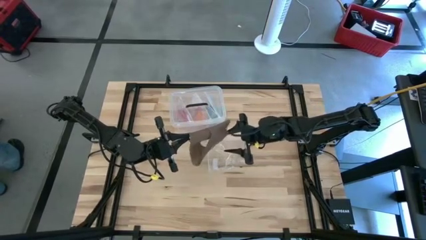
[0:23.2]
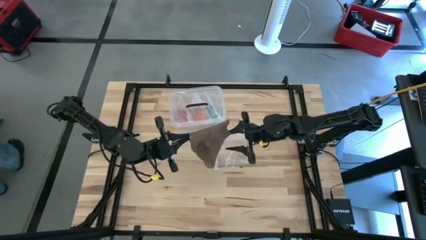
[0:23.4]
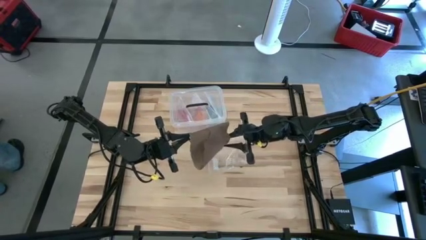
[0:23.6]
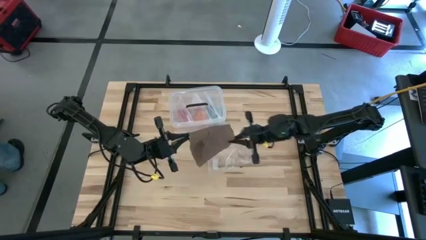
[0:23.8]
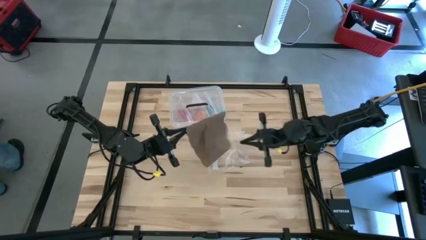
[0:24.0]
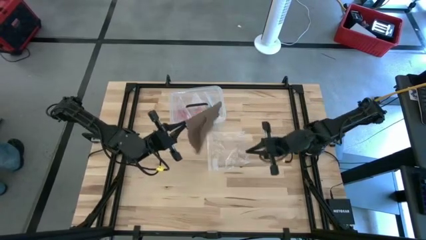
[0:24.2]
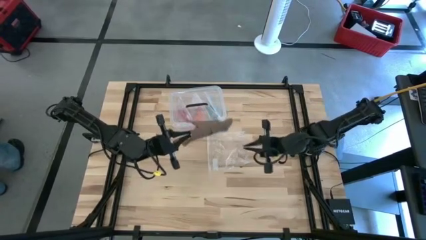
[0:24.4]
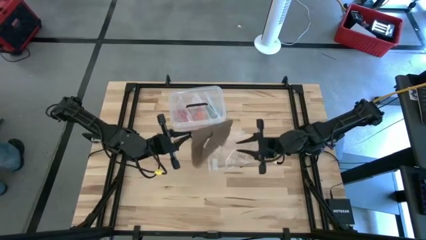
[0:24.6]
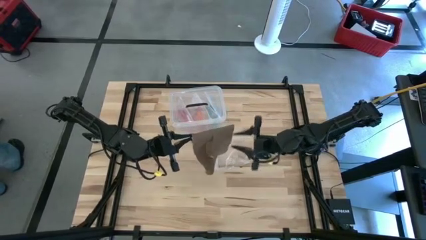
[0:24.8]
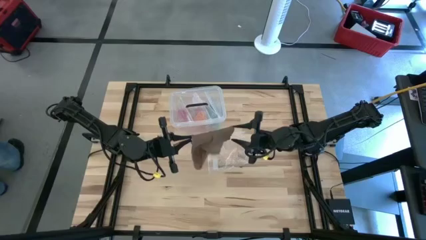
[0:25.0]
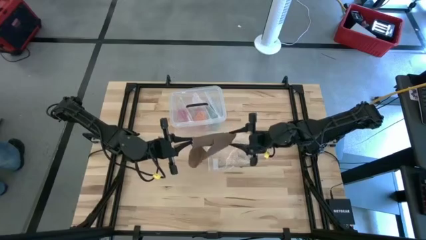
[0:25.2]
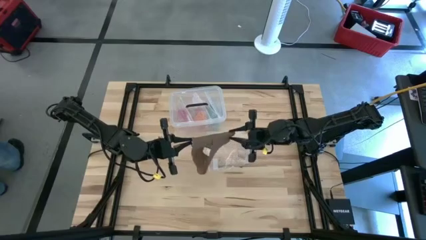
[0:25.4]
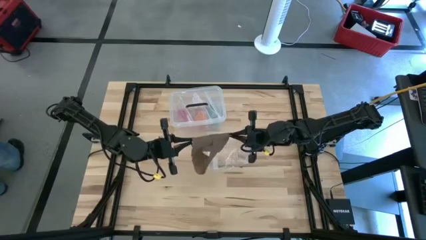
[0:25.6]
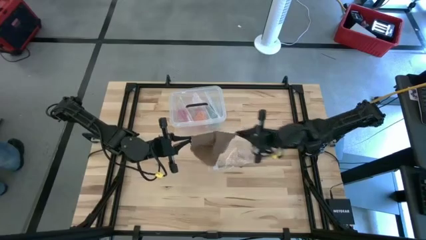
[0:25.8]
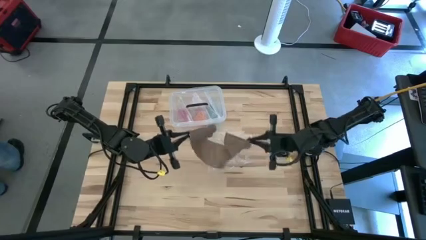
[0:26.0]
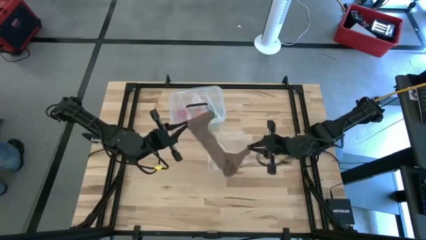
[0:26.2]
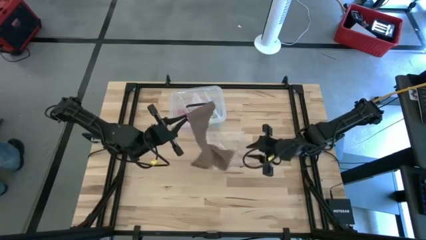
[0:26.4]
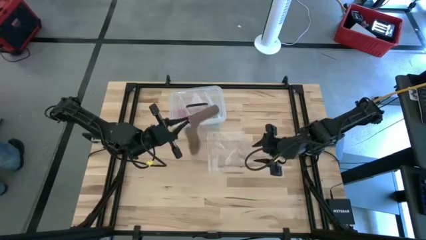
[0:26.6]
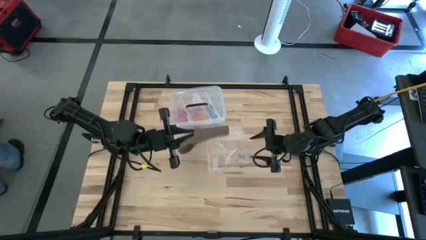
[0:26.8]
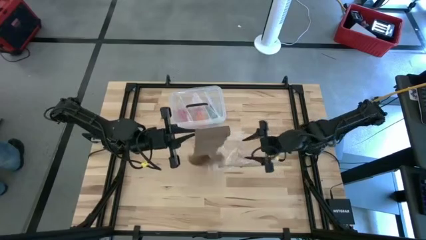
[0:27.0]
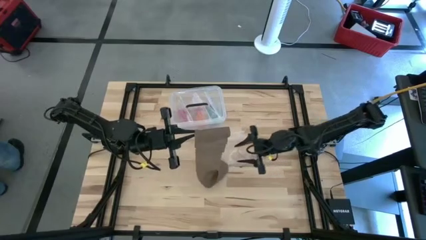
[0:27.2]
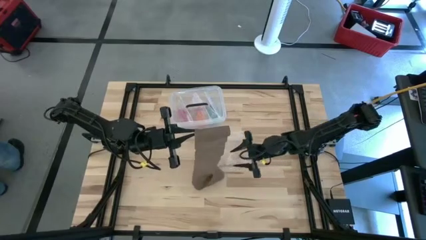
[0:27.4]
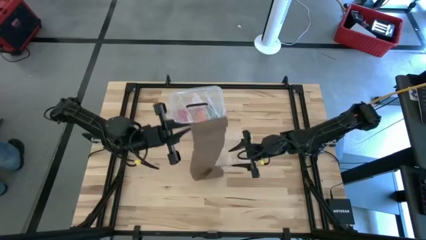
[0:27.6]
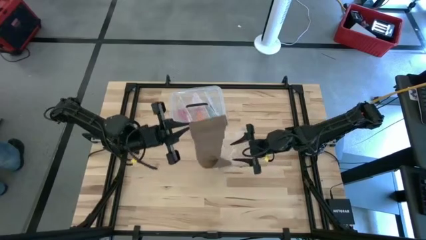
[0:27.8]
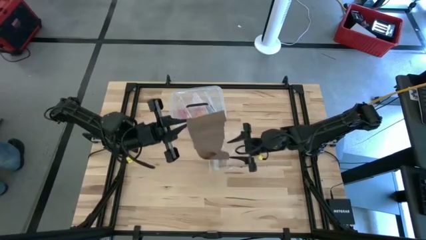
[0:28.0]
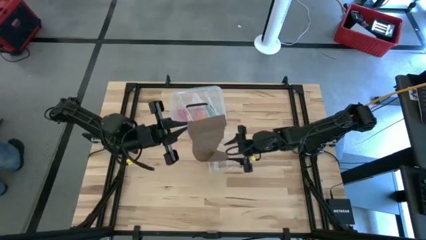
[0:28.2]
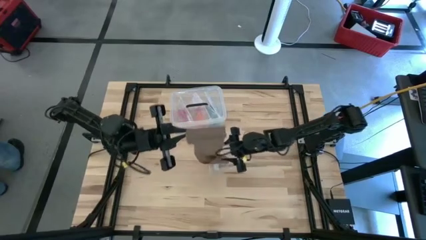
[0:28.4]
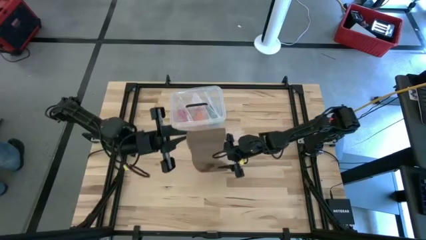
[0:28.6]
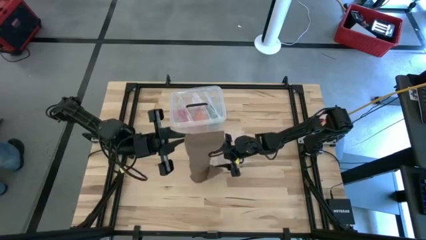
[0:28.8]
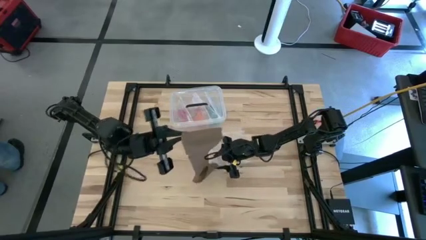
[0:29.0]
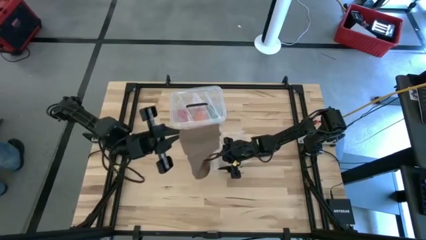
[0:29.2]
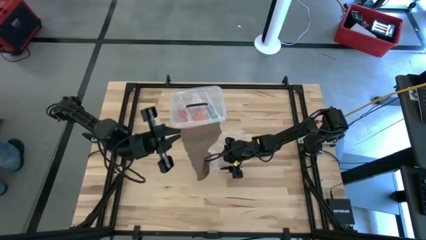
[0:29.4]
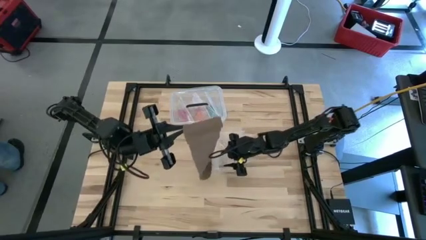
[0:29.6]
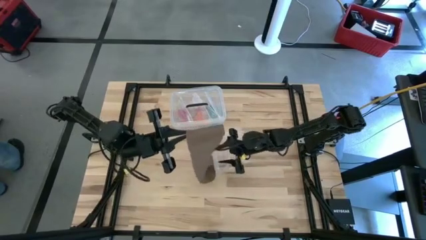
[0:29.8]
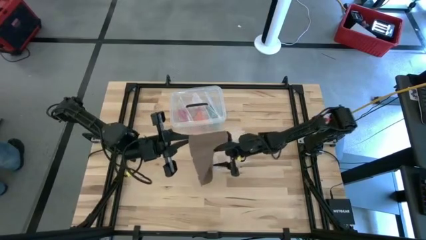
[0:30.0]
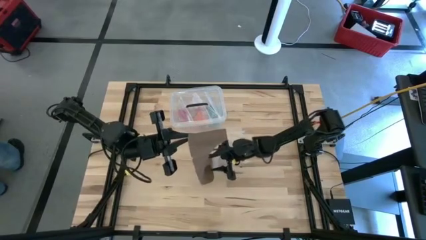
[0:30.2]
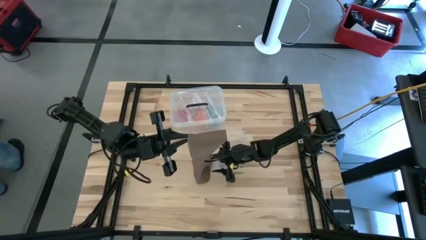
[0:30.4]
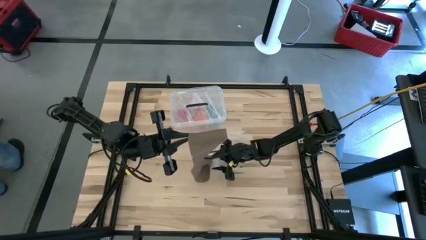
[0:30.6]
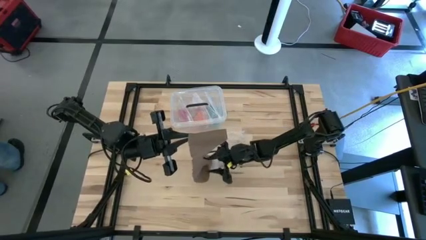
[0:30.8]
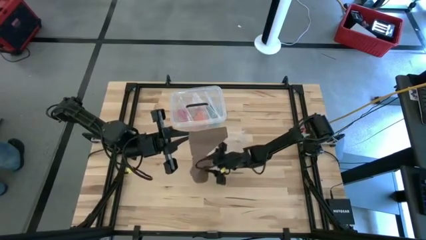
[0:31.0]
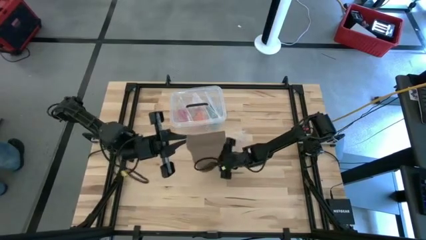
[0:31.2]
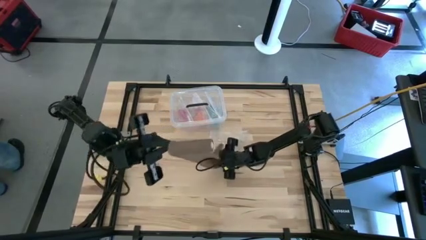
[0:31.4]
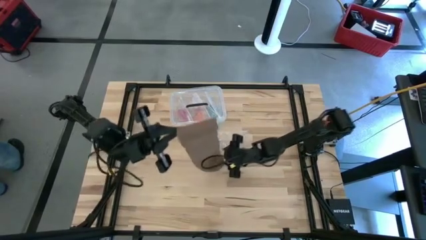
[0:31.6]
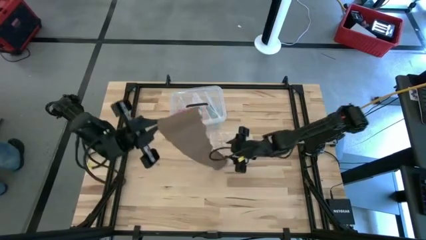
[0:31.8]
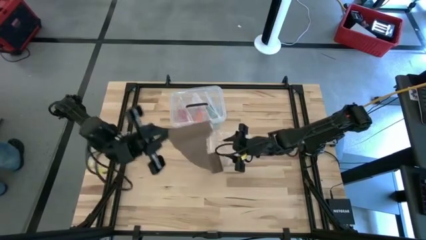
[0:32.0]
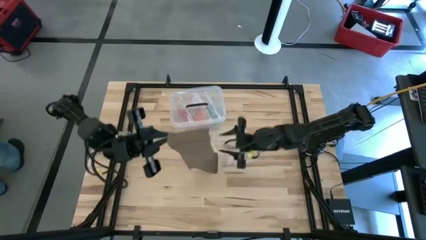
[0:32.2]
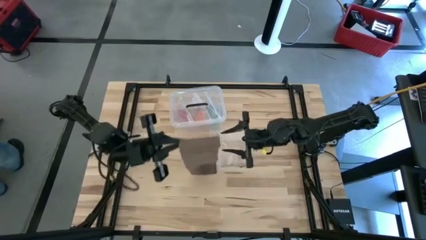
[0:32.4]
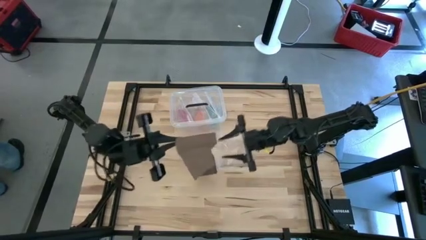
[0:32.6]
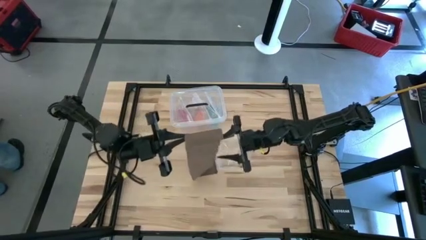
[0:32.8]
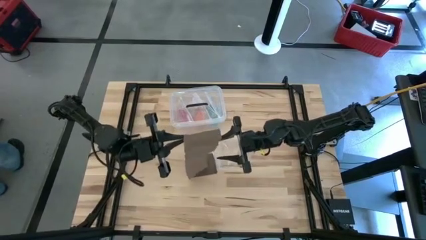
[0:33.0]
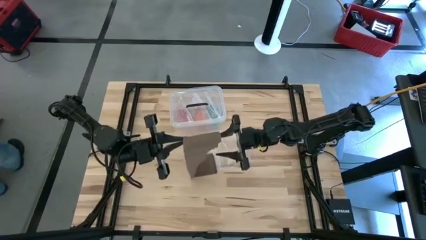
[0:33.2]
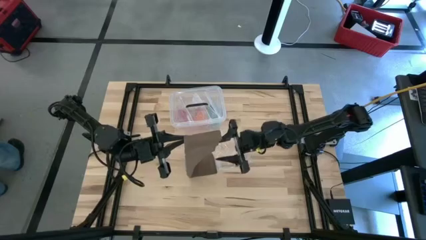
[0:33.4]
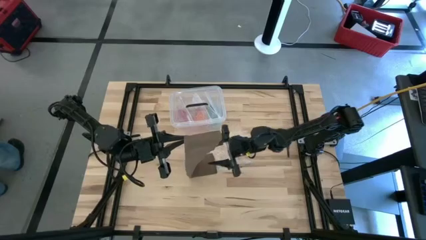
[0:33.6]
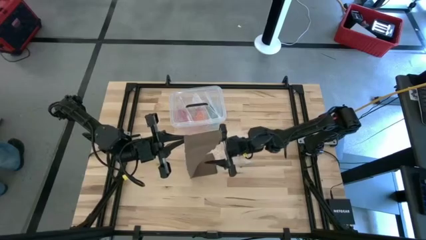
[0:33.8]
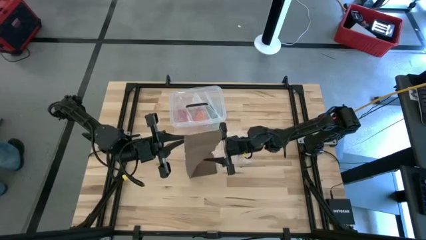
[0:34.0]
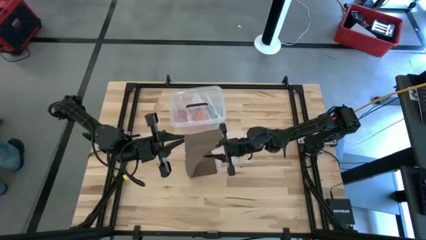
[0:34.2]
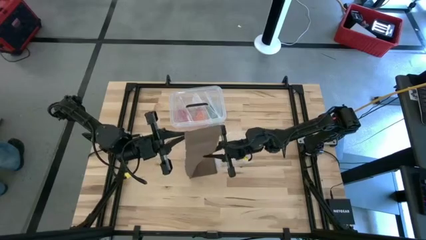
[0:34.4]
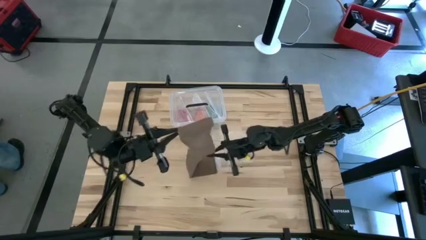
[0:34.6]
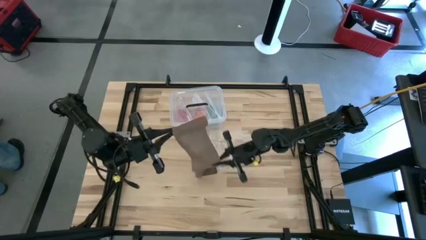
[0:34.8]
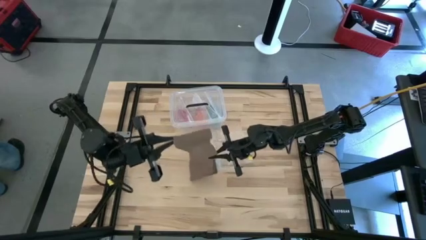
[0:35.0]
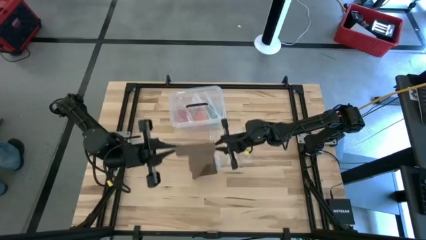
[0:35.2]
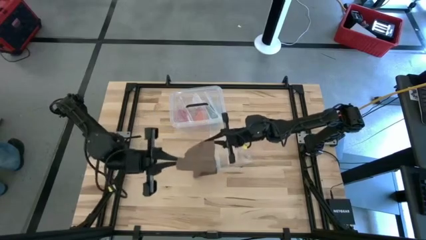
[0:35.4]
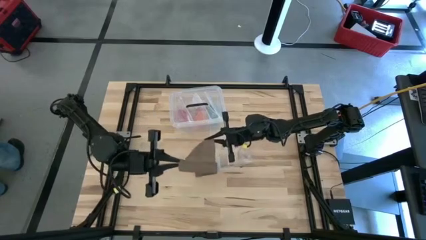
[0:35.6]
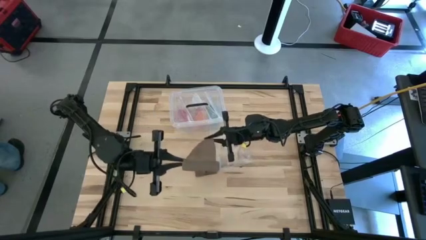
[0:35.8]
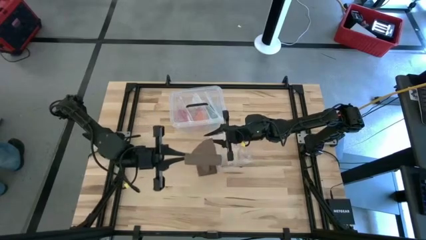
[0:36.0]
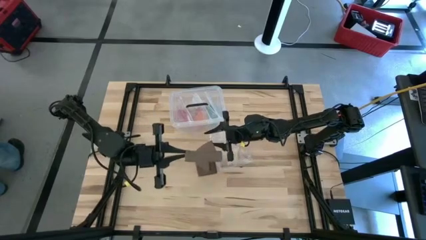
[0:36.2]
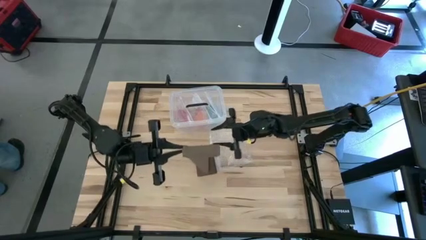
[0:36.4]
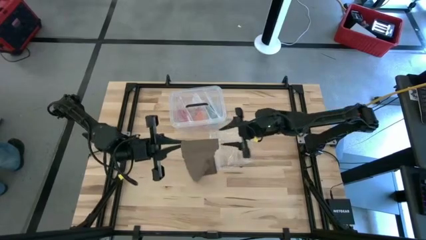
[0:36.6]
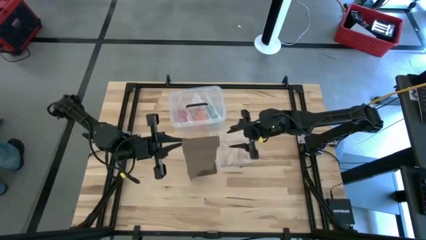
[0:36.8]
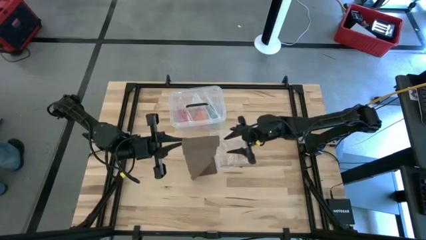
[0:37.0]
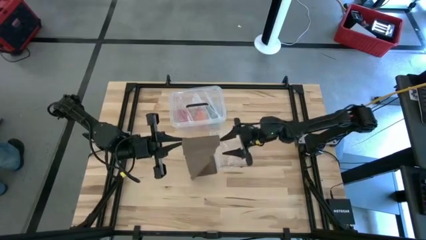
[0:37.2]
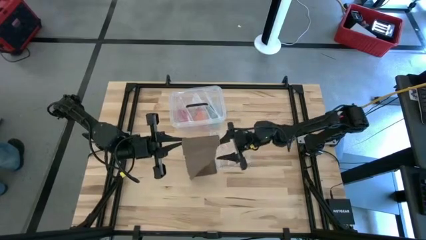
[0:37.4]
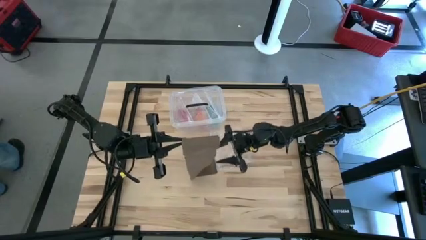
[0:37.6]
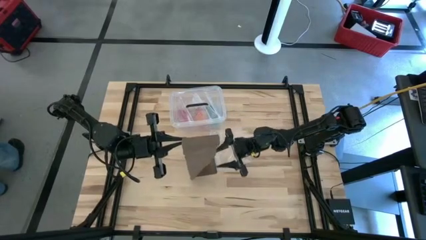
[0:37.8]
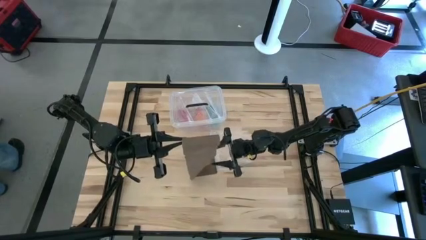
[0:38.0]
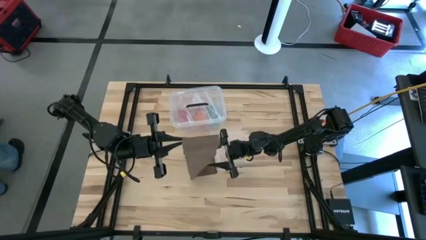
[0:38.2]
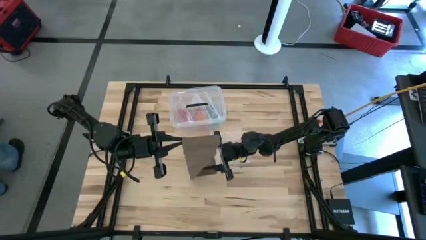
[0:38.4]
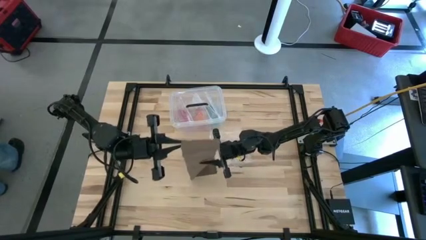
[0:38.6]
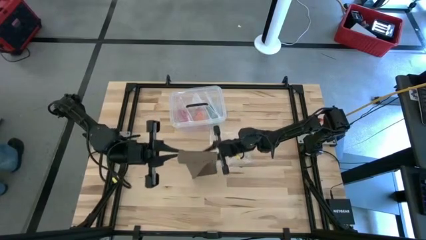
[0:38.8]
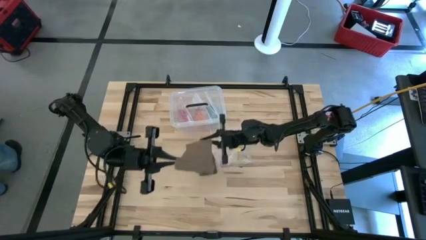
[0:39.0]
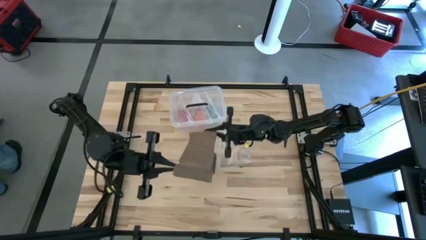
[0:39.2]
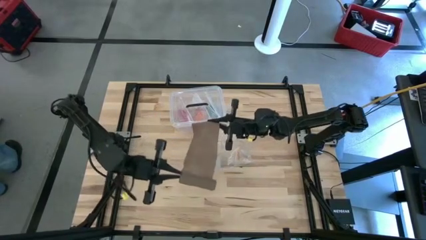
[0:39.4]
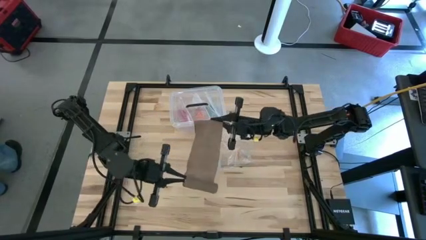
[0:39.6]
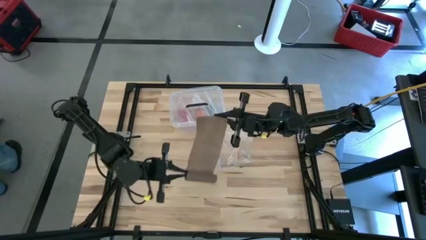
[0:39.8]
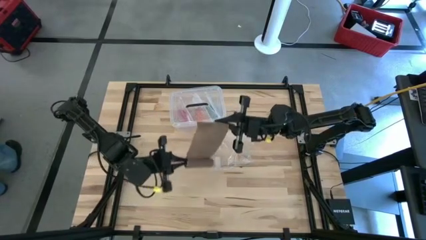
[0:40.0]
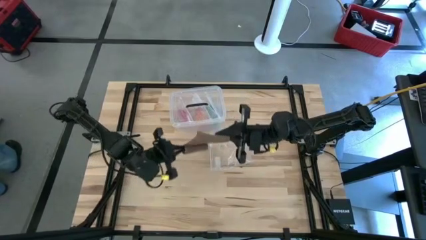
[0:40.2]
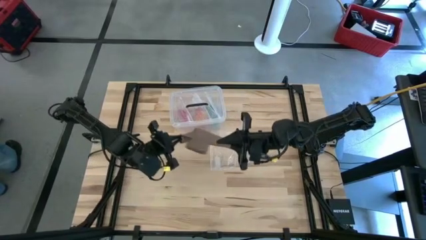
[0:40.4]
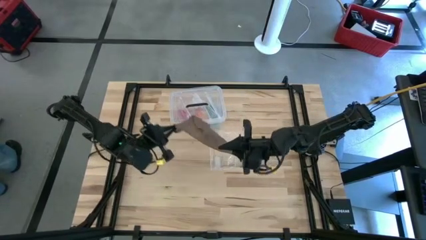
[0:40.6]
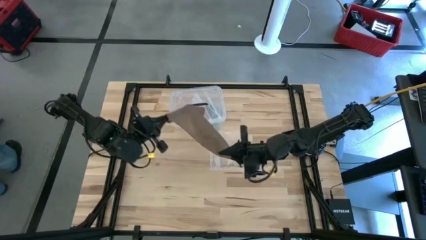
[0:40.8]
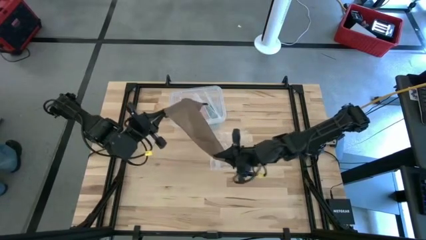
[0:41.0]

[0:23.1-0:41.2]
Task: Roll bandage
Roll the brown bandage
